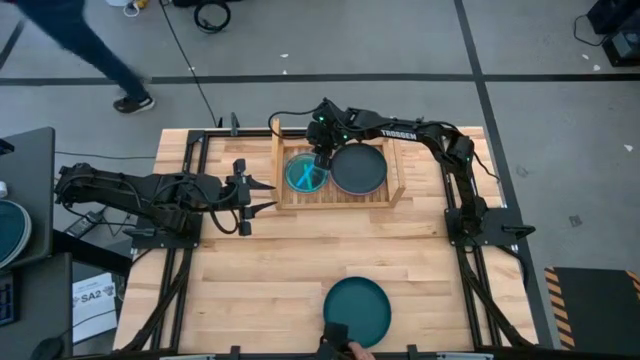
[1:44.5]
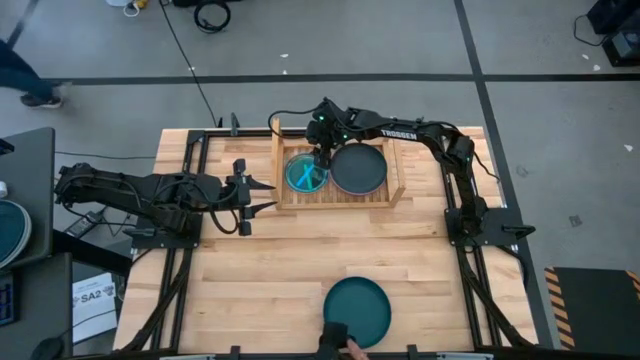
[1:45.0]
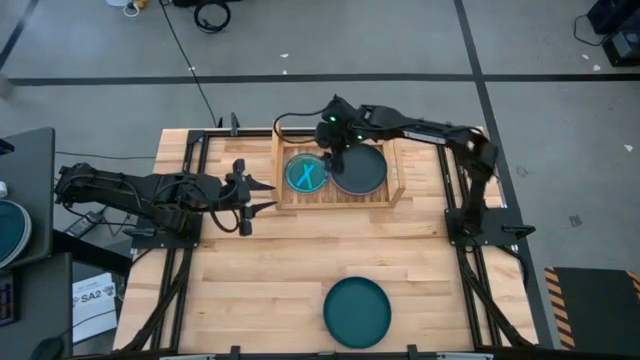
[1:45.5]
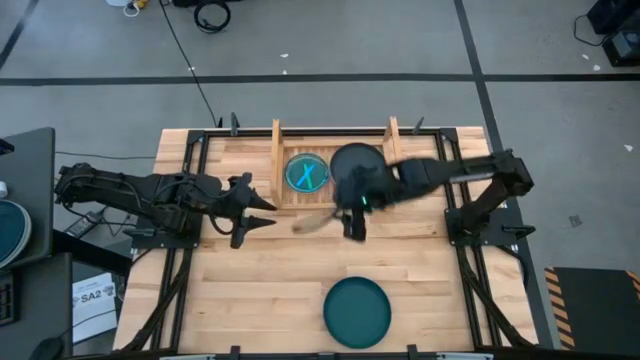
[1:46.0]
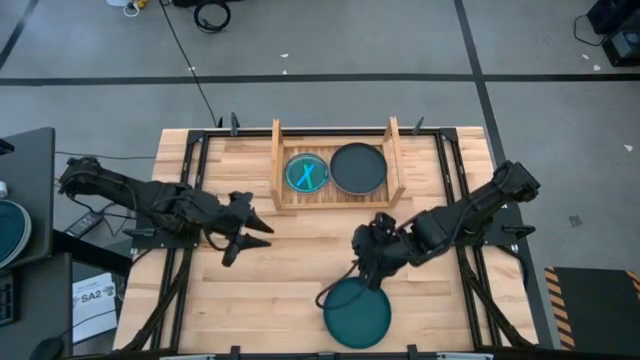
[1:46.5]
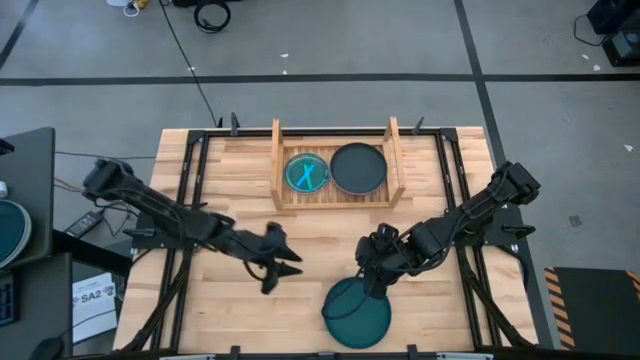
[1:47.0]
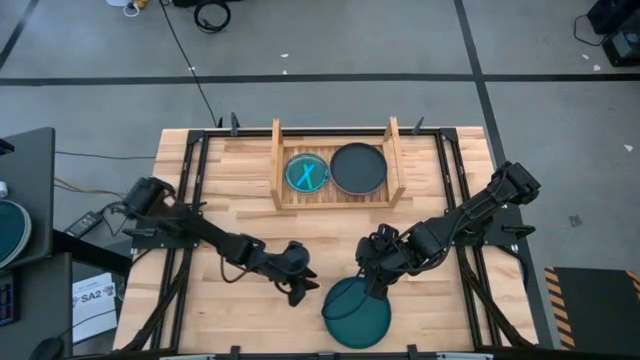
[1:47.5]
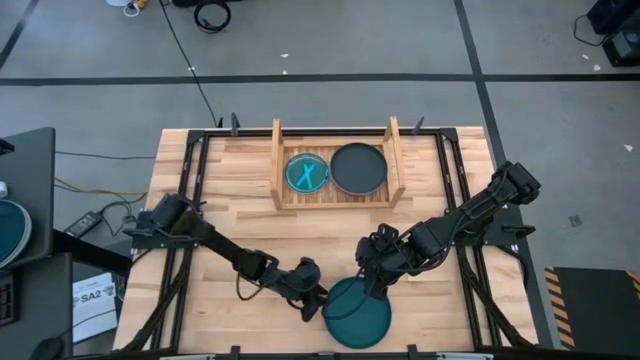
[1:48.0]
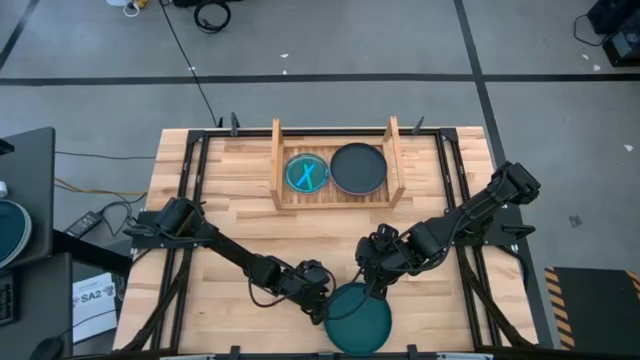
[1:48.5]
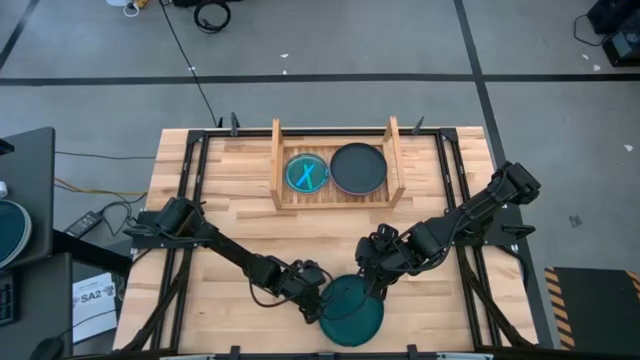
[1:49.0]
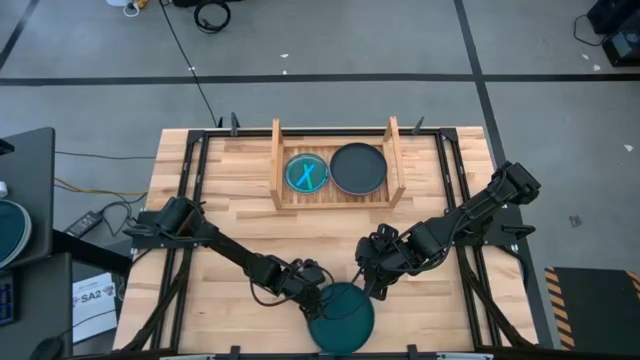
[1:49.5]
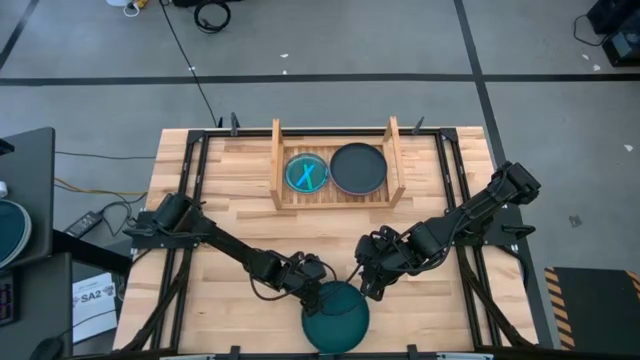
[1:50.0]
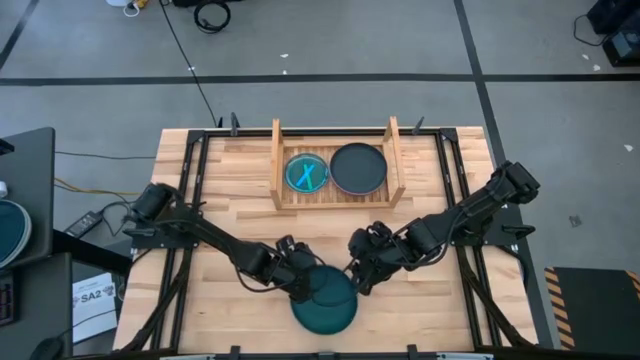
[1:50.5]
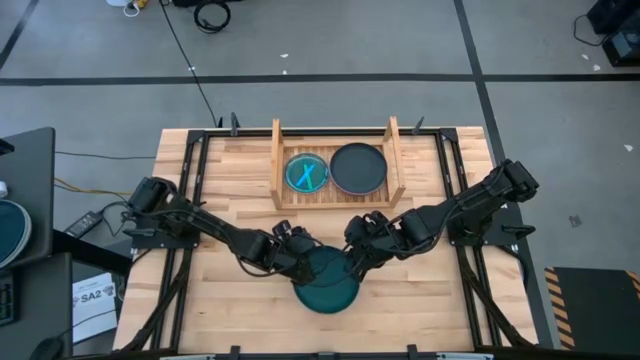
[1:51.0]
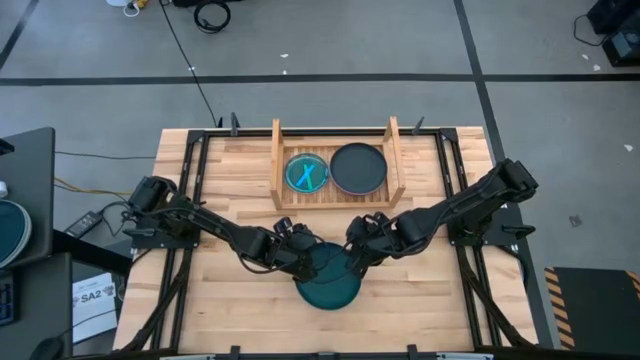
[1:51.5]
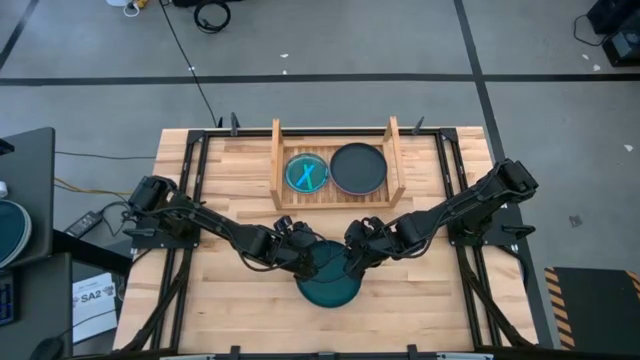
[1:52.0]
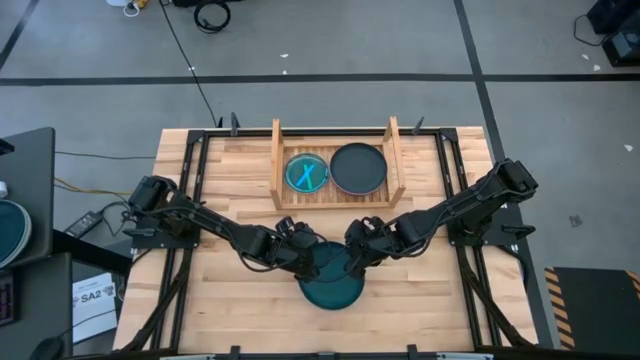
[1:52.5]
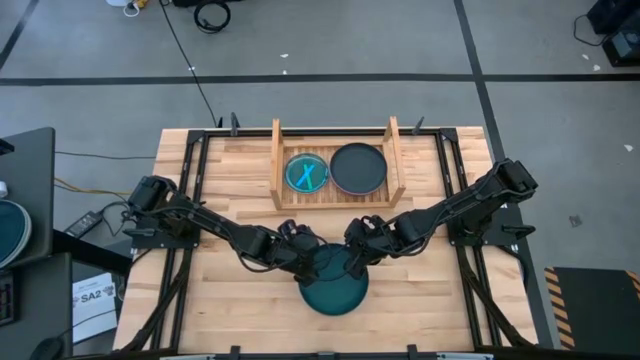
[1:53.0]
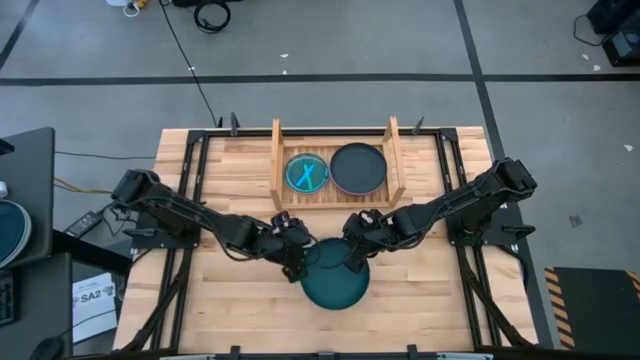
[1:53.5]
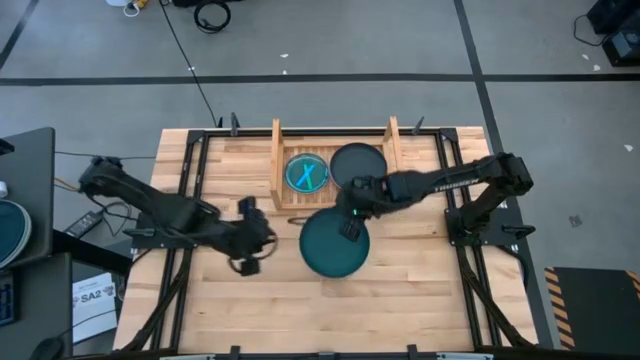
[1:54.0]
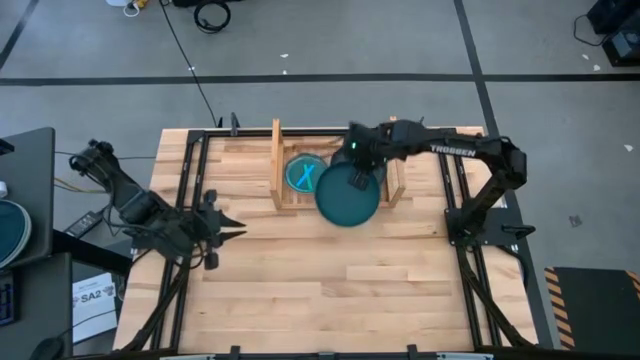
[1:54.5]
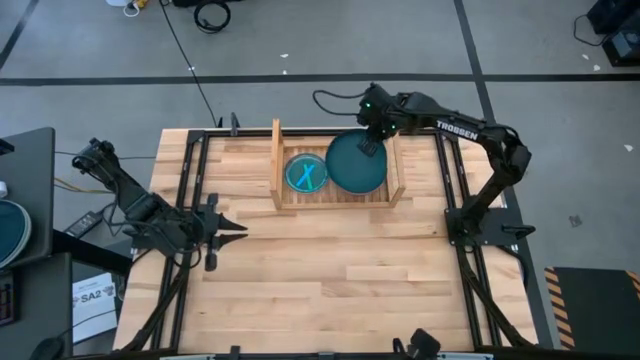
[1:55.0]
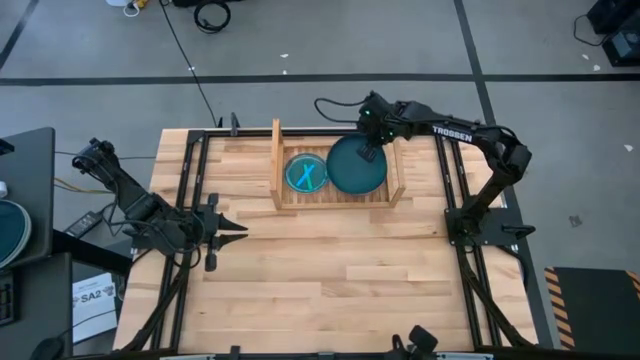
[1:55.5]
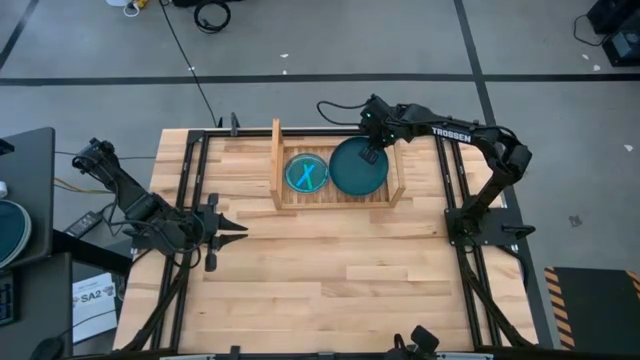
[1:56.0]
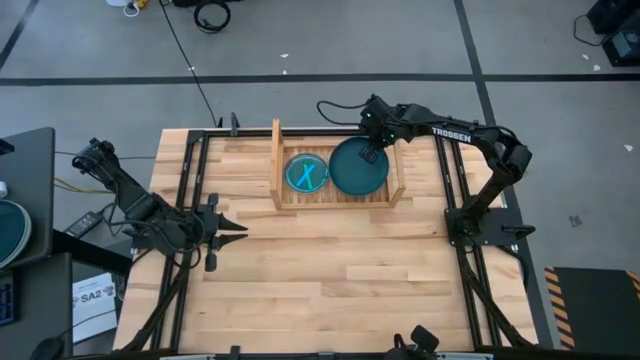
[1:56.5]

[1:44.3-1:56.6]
Task: Place and stack plates onto a shelf
Stack the large black plate on top of the large black plate on the shelf

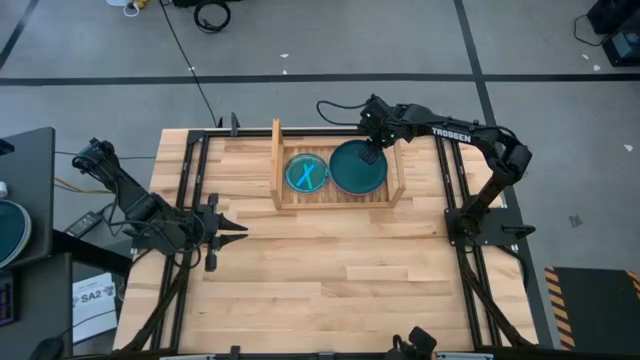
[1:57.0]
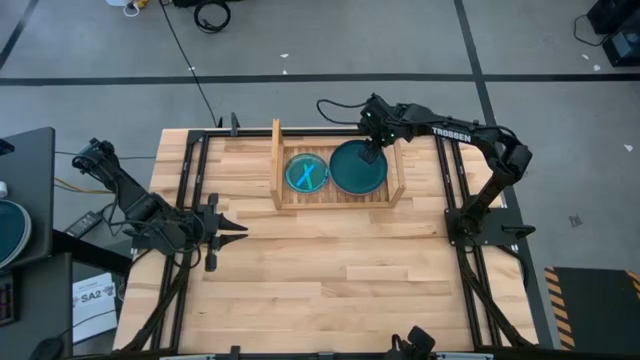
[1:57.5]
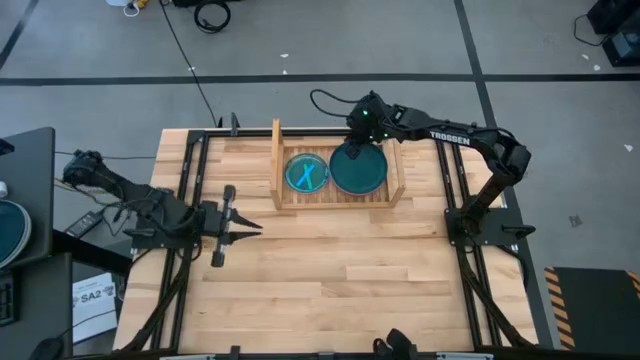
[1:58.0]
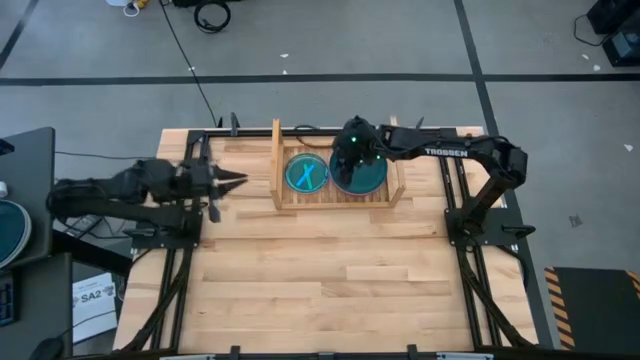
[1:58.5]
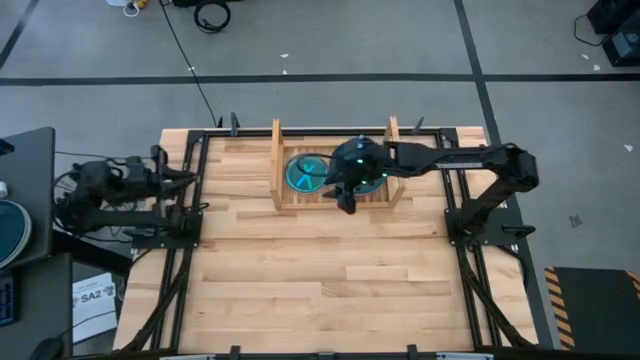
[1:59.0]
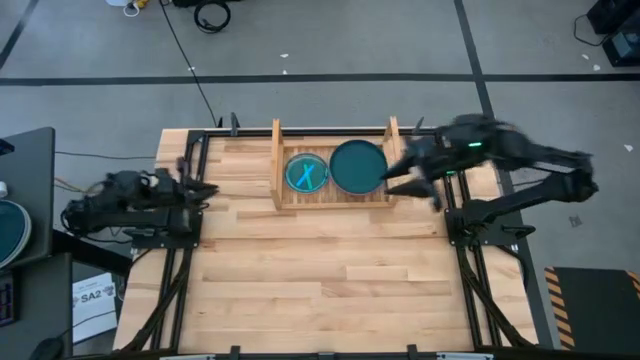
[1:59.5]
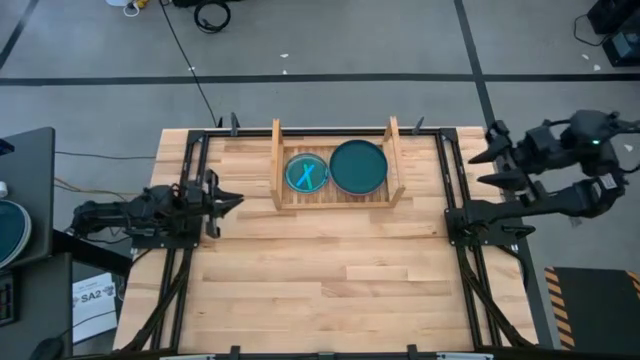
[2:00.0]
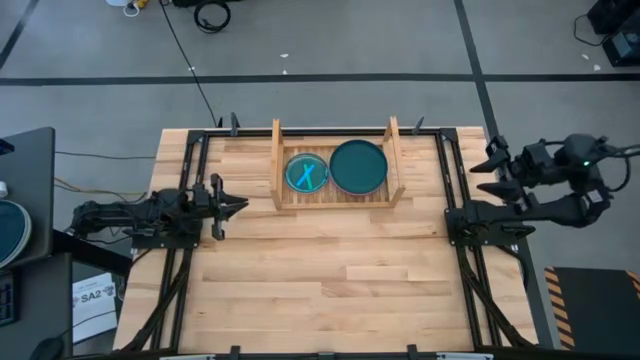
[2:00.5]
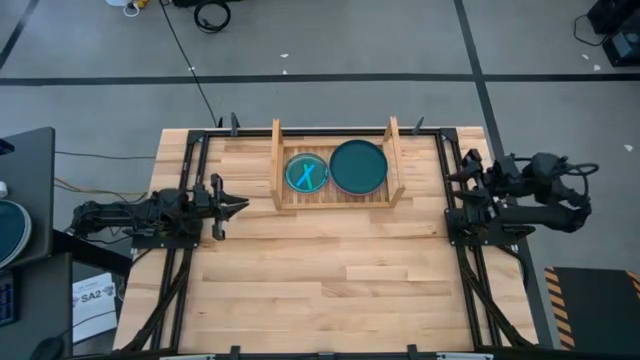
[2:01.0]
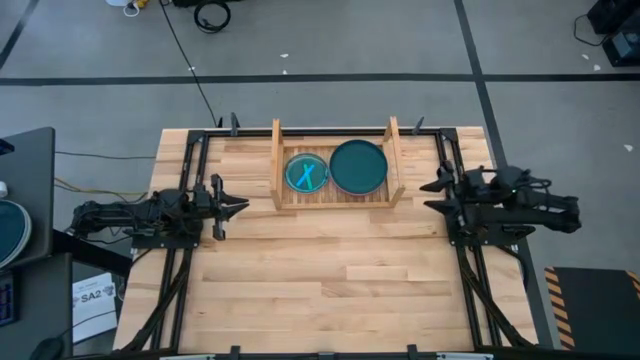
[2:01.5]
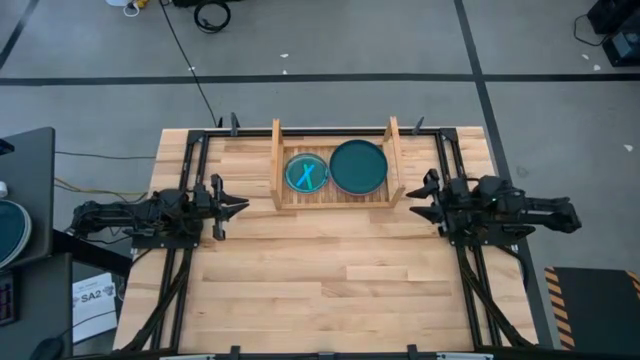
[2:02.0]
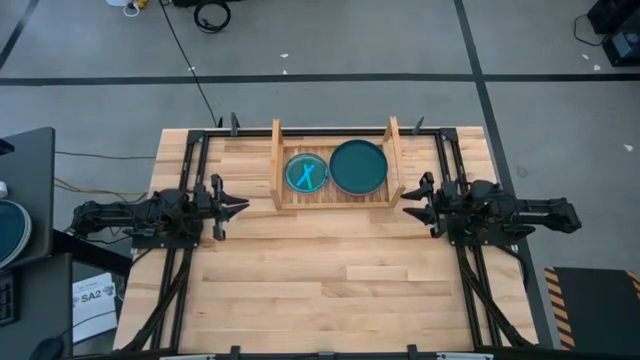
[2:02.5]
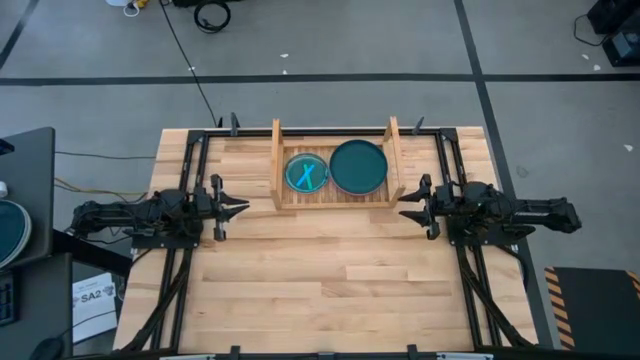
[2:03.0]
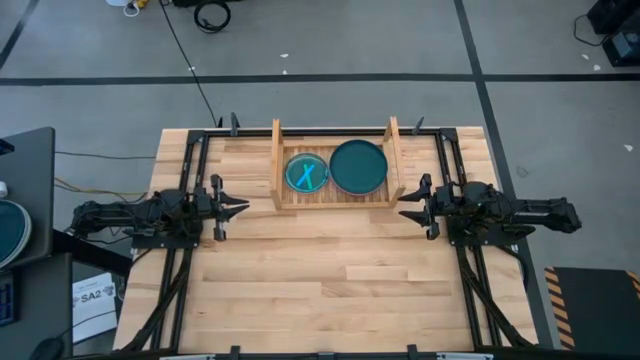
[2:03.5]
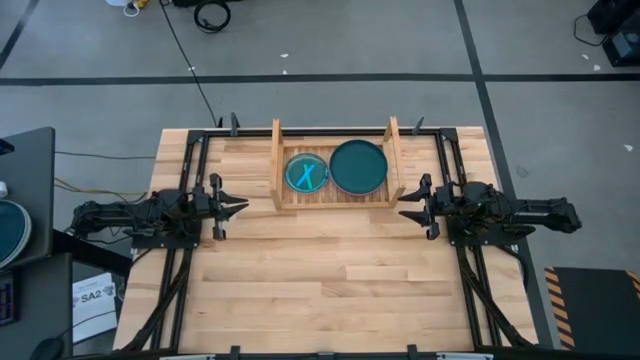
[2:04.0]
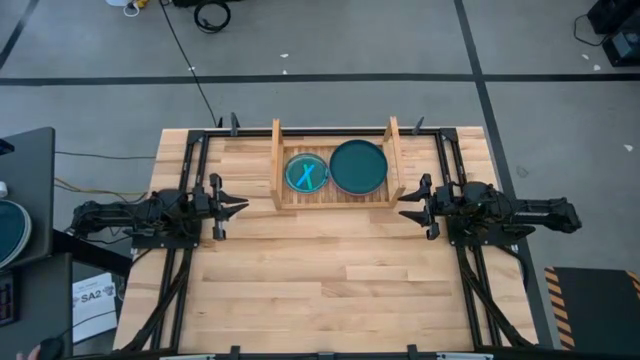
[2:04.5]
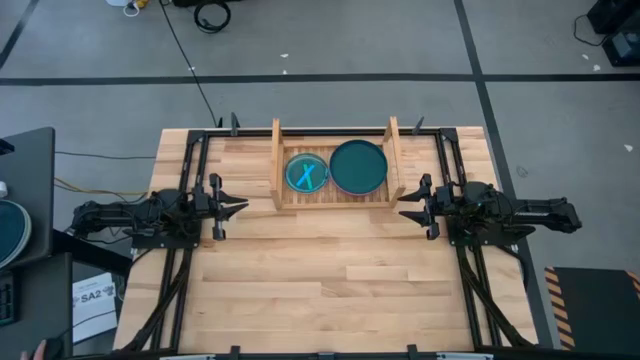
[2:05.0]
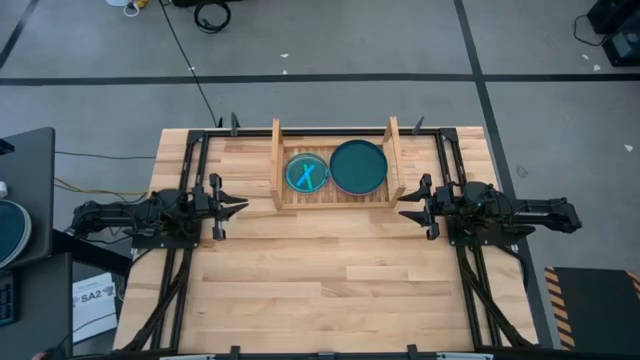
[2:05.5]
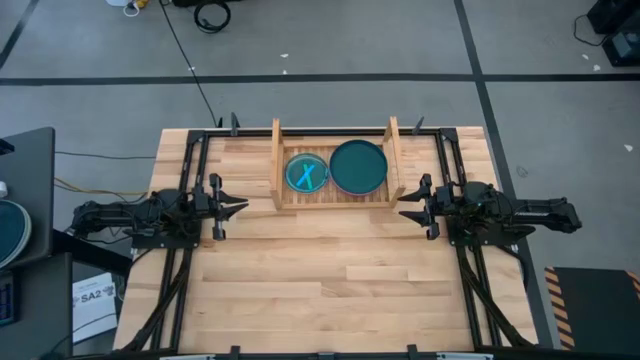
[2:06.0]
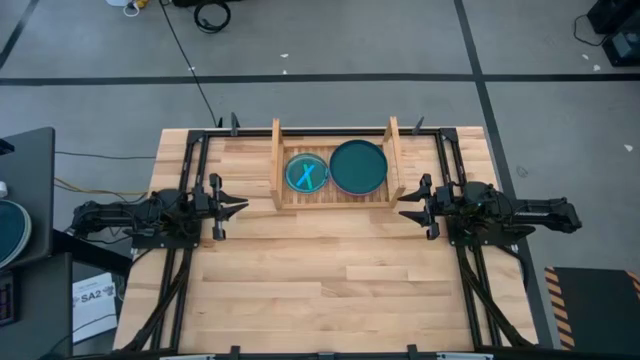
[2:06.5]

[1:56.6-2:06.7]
Return to Home Position
